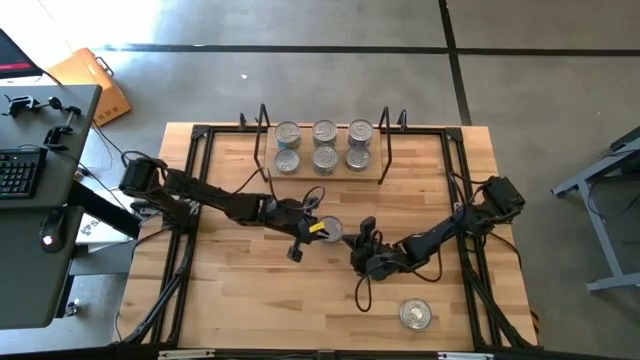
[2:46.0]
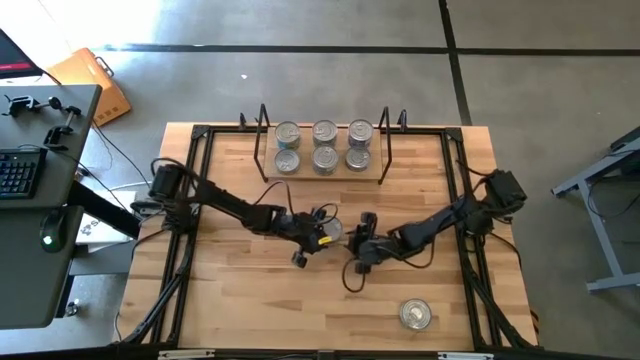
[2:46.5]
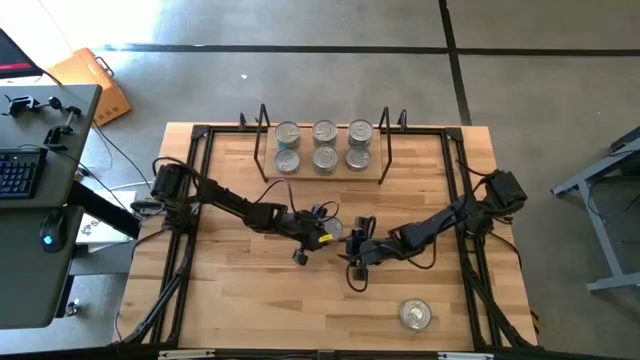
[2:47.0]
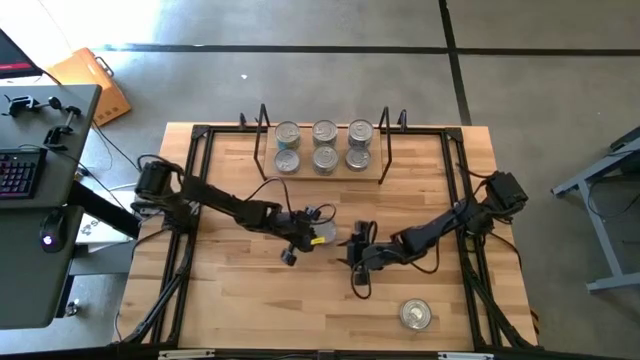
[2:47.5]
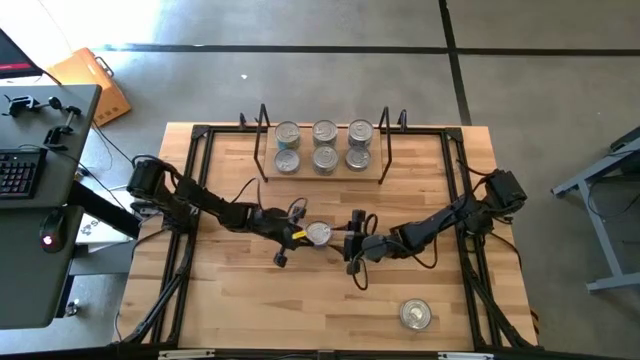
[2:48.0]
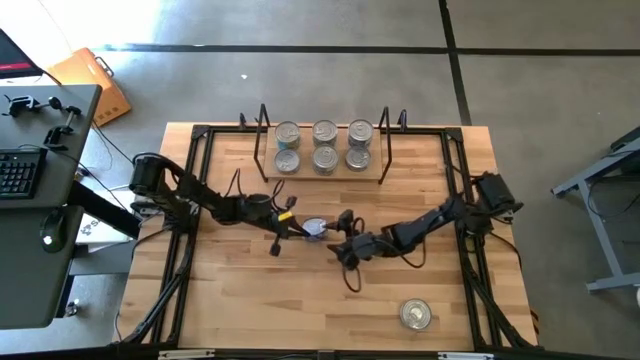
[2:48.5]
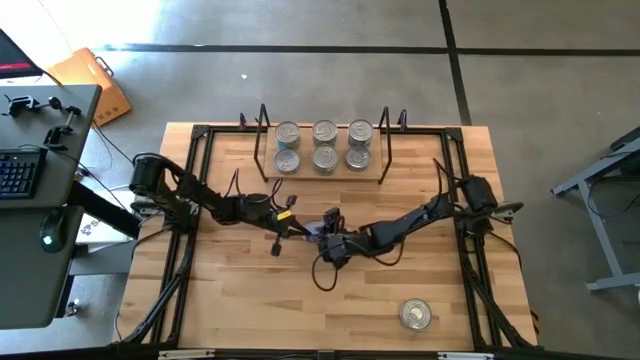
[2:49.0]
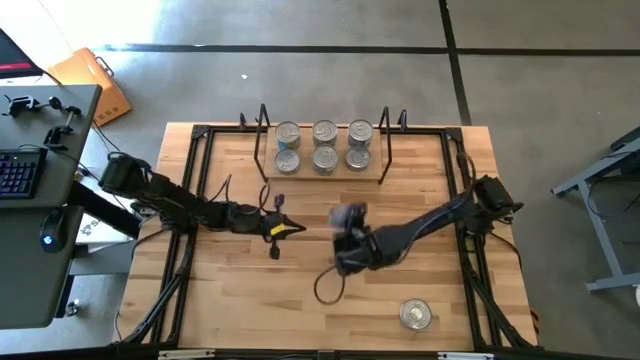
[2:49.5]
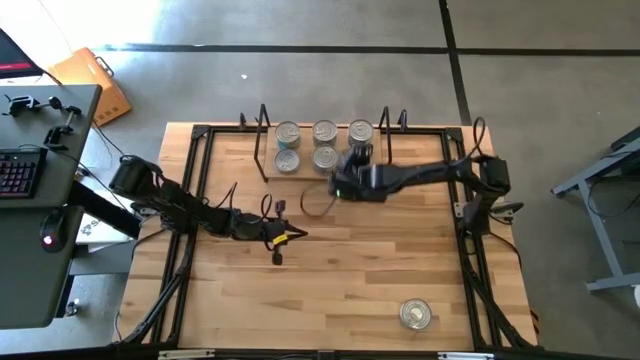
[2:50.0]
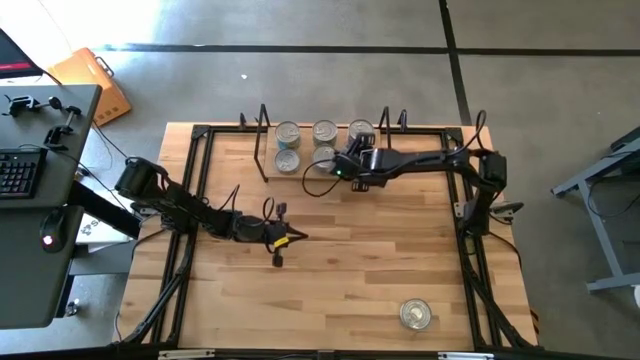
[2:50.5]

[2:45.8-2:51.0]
Task: Stack canned seafood by type on shelf
Stack the blue tuna can on top of the bottom blue tuna can on the shelf

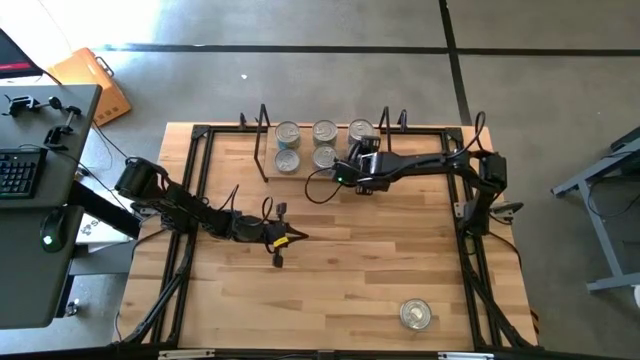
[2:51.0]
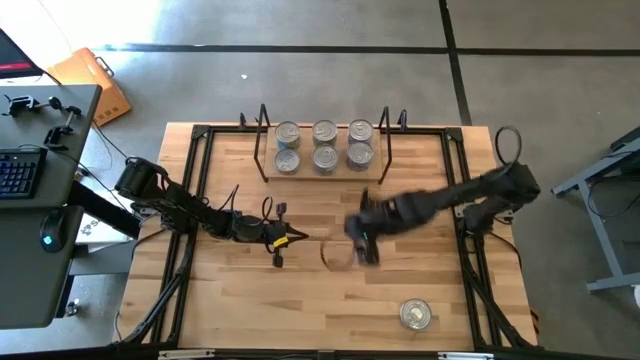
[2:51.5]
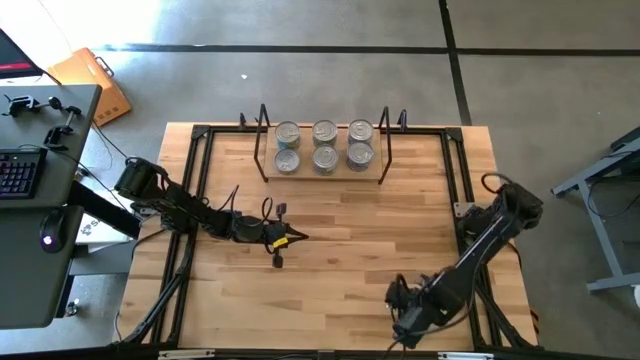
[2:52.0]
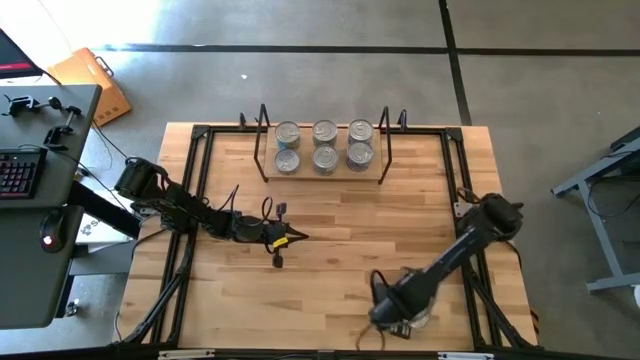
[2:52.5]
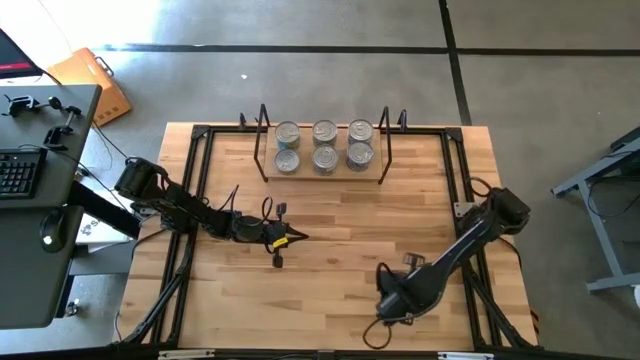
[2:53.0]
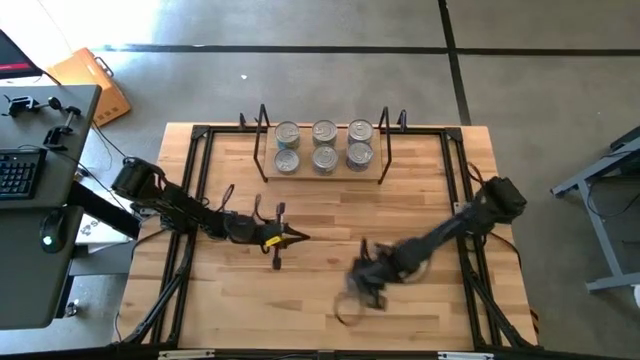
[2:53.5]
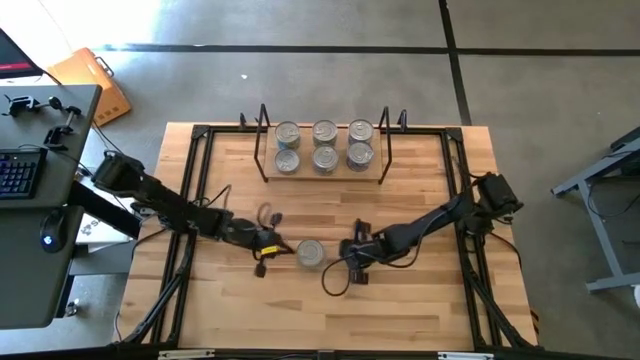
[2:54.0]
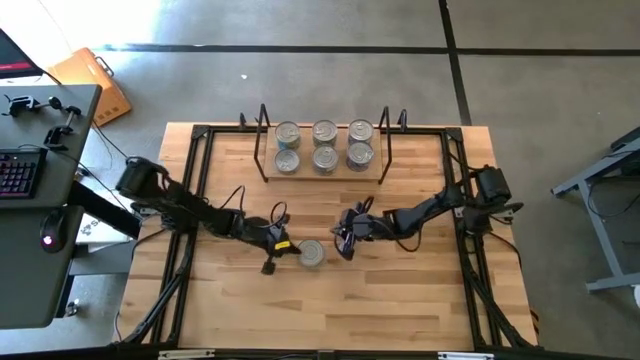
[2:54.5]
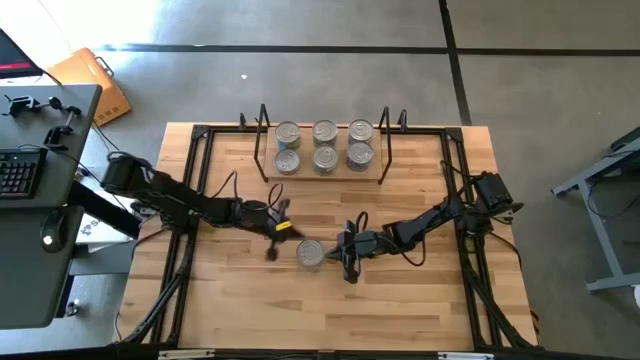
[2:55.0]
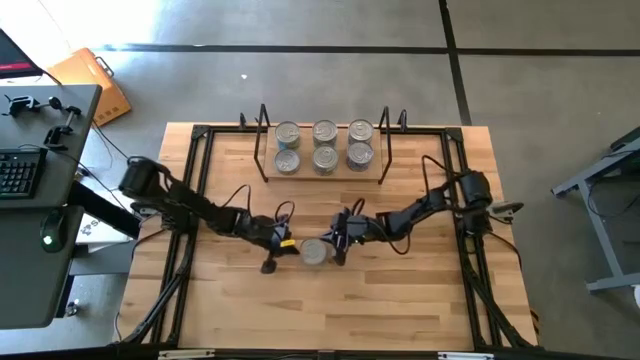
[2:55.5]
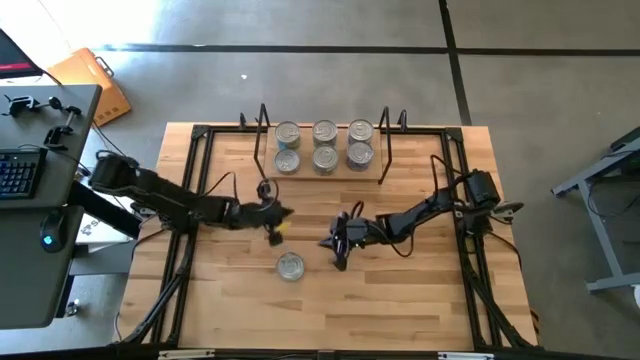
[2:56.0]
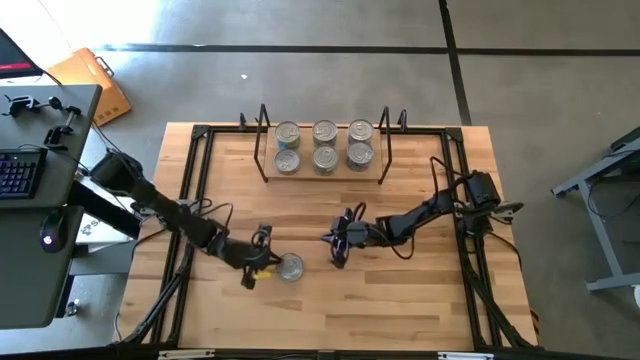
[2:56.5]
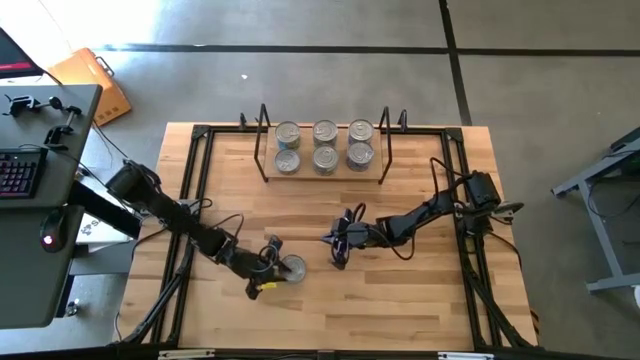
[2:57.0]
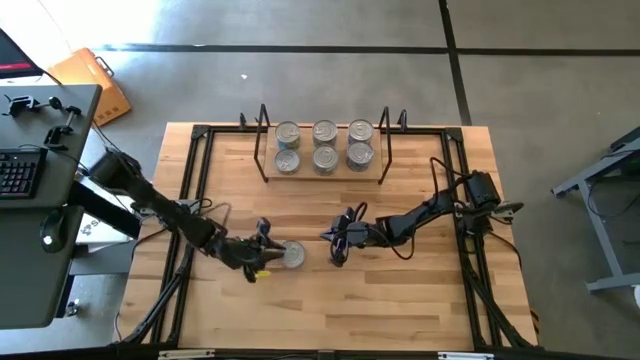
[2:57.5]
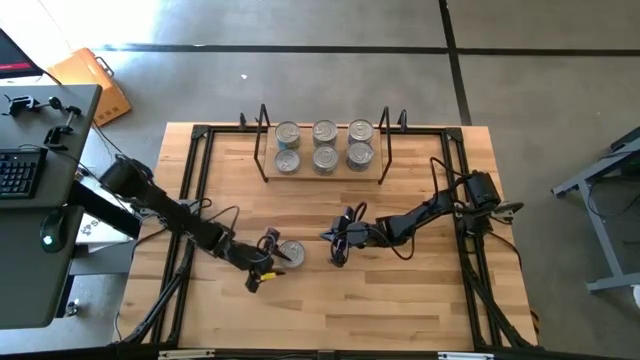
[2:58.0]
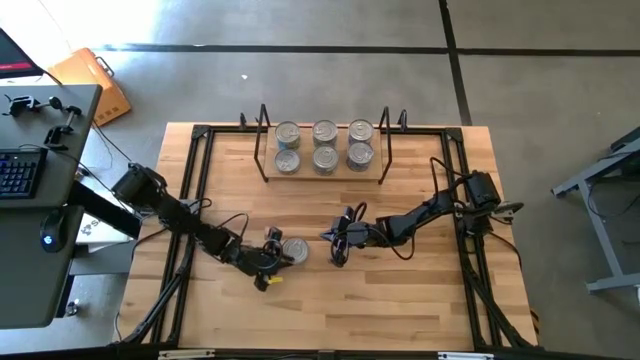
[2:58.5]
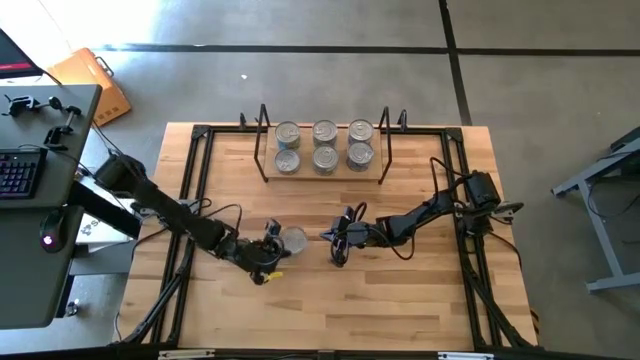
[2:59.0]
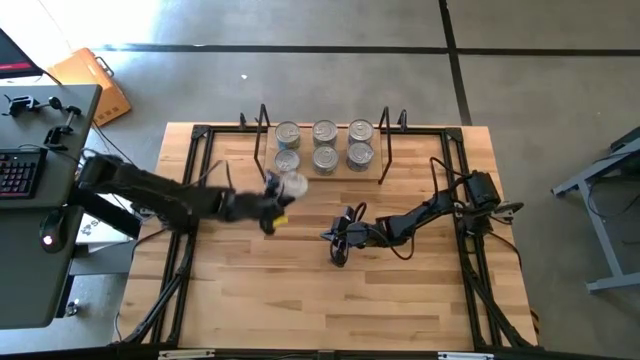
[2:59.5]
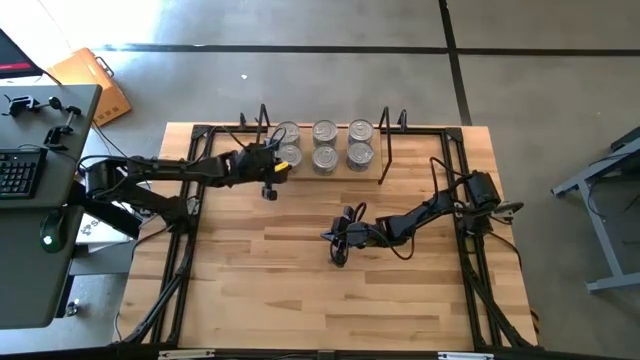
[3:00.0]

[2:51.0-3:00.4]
Stack the yellow-blue tuna can on top of the yellow-blue tuna can on the shelf

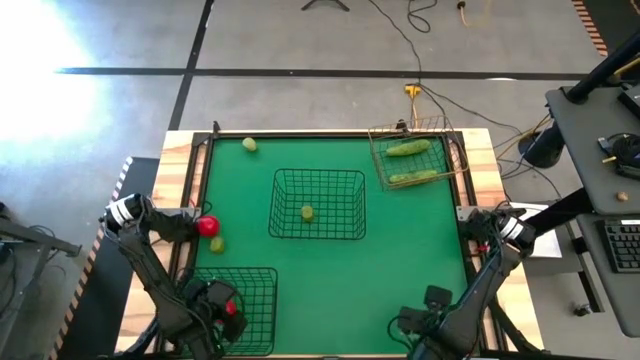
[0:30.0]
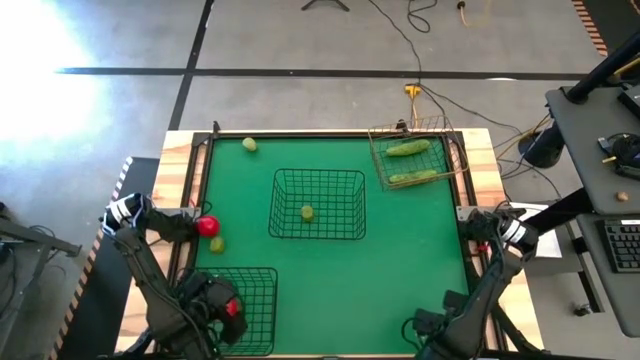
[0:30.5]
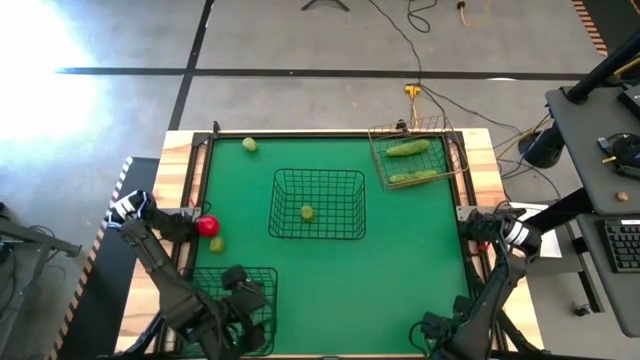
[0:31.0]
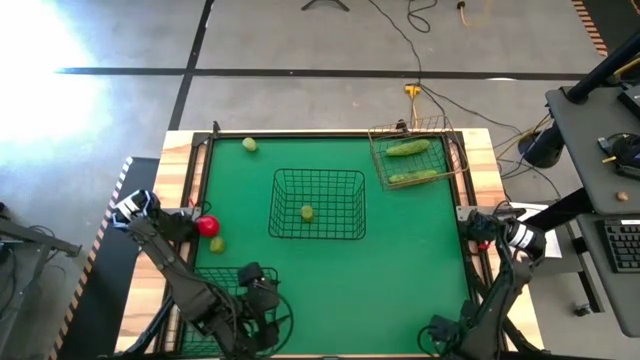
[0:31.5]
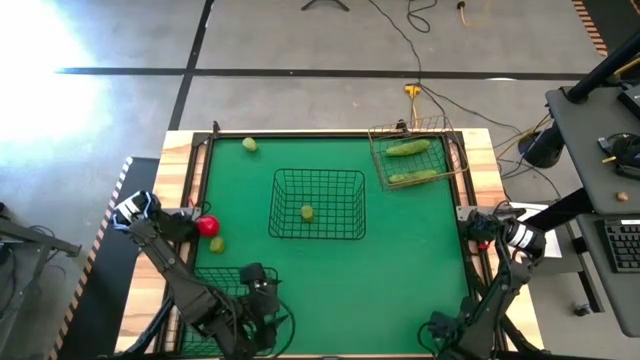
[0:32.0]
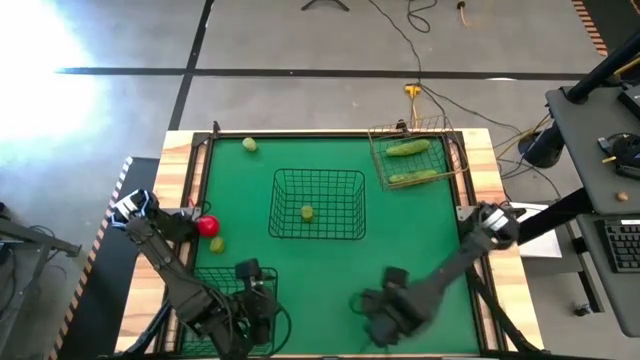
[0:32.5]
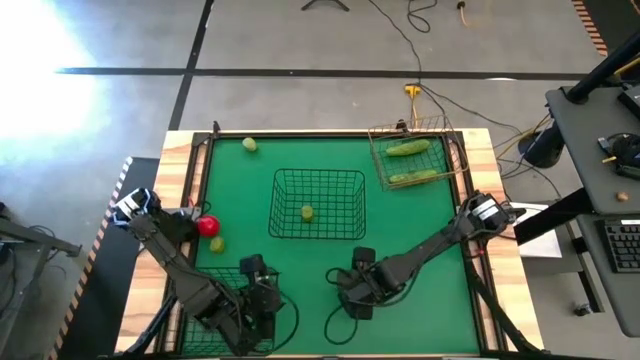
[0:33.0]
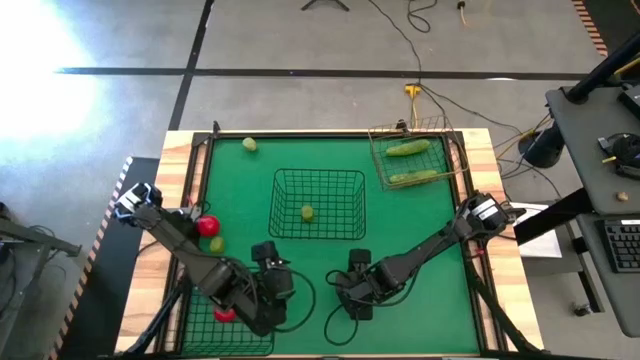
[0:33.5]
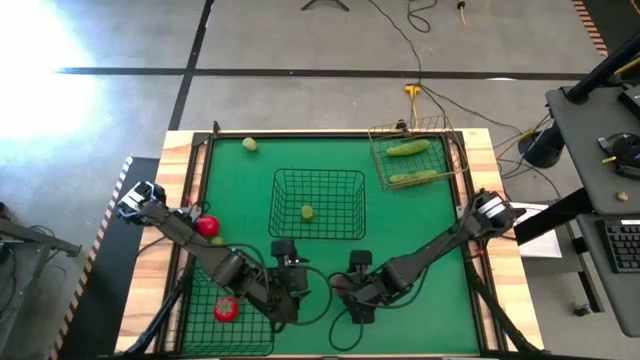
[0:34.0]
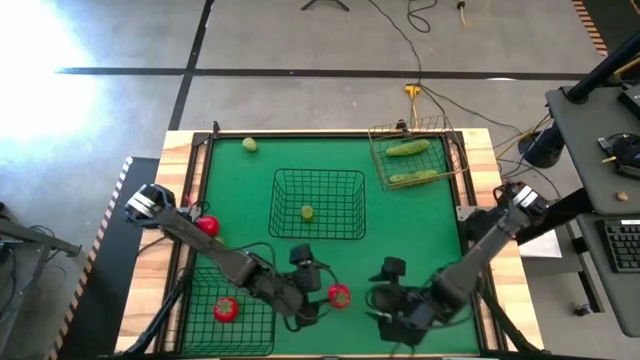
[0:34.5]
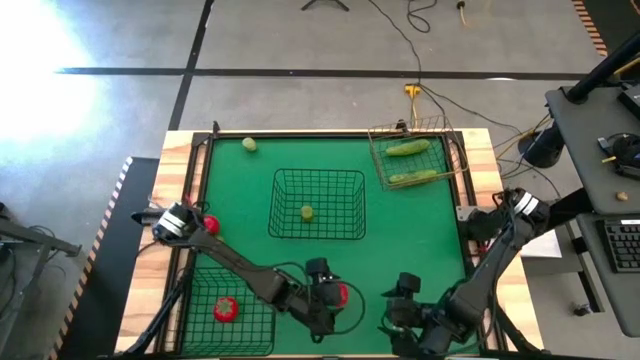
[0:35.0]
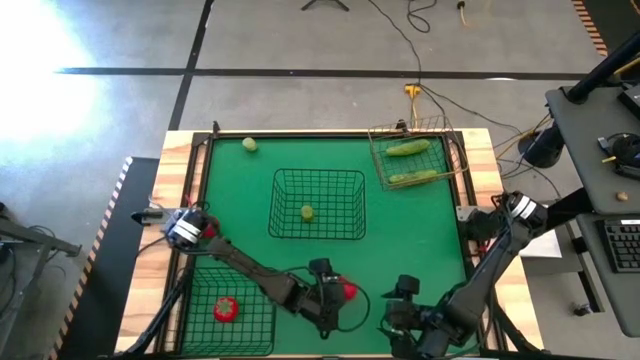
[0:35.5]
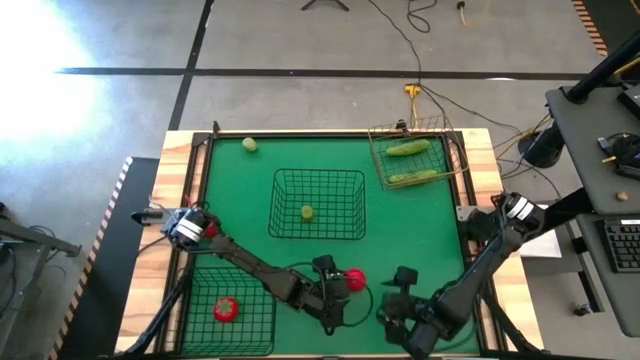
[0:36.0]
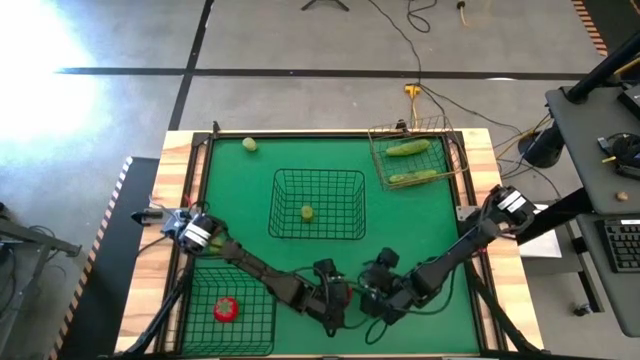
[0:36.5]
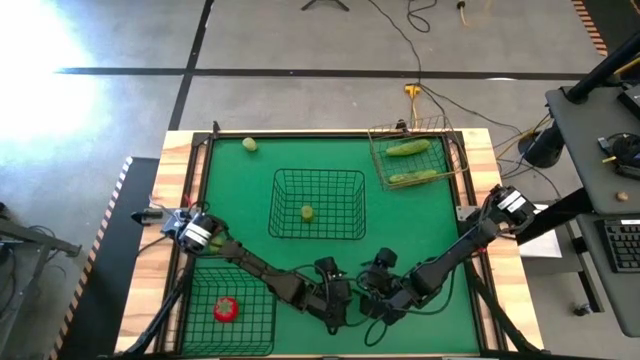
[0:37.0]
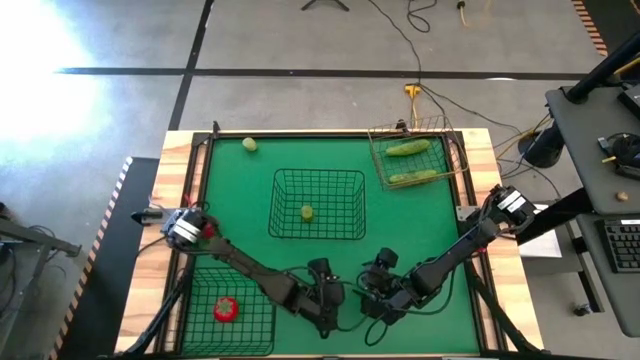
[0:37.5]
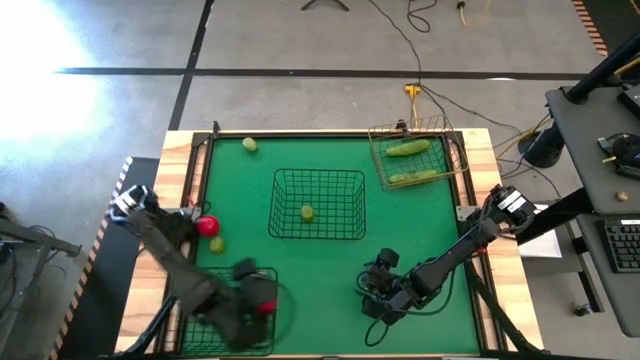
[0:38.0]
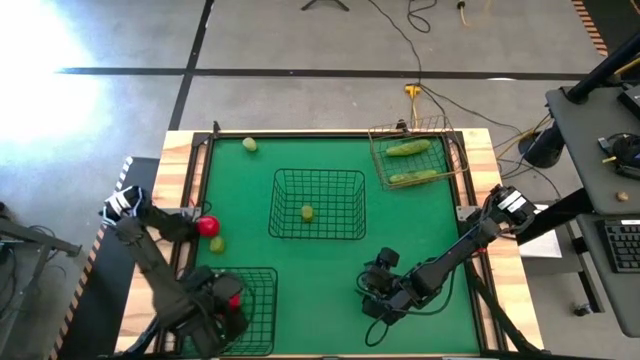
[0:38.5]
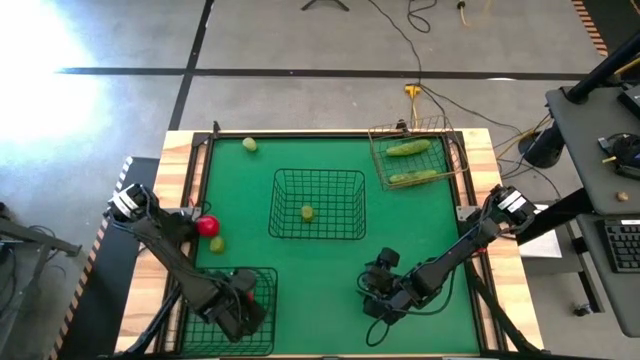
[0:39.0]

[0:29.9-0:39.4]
Task: Sort produce into baskets
Put the right red tomato into the bottom black wire basket
